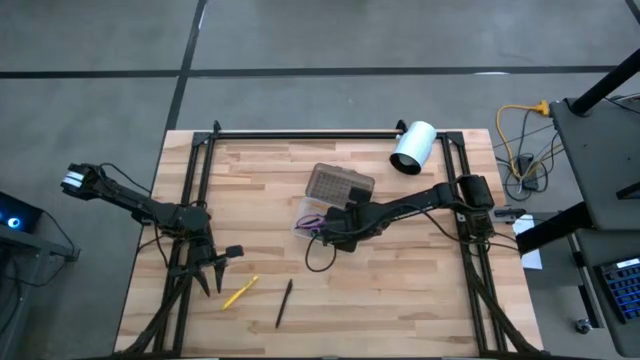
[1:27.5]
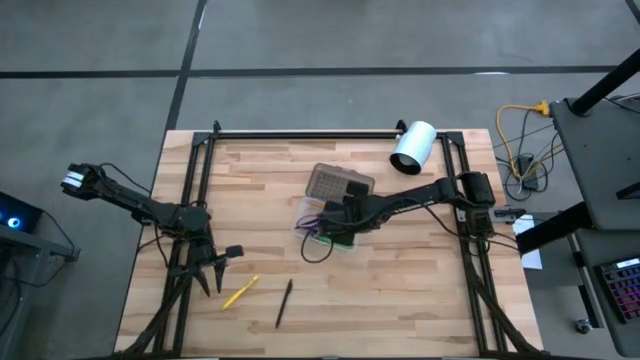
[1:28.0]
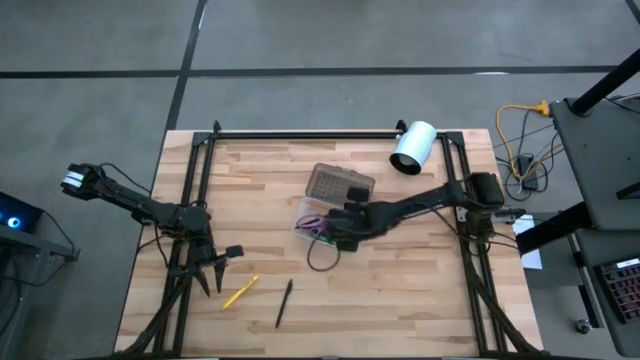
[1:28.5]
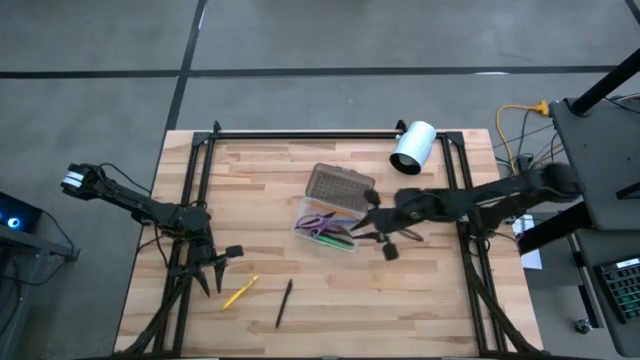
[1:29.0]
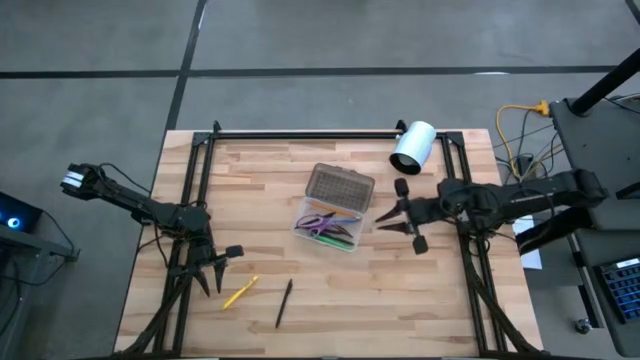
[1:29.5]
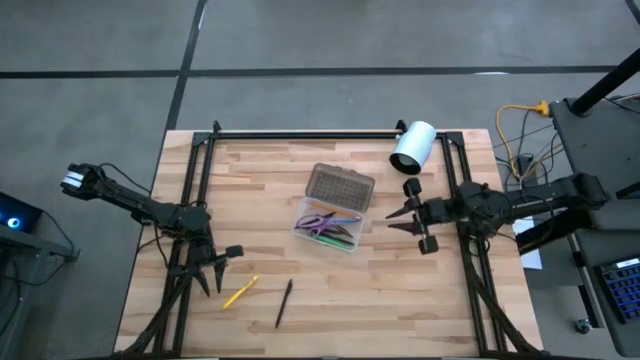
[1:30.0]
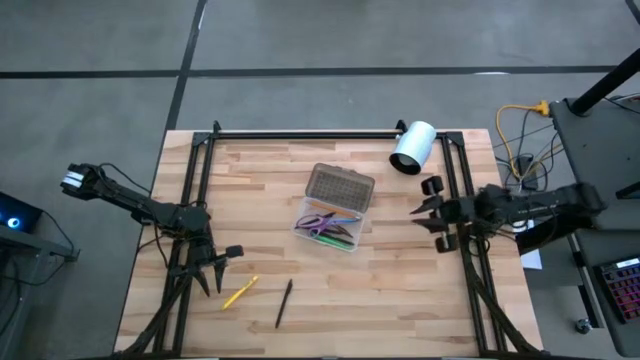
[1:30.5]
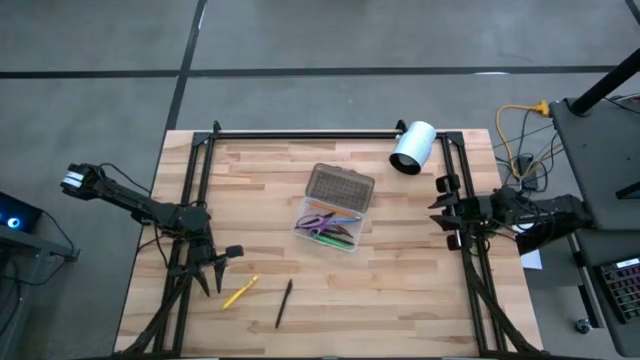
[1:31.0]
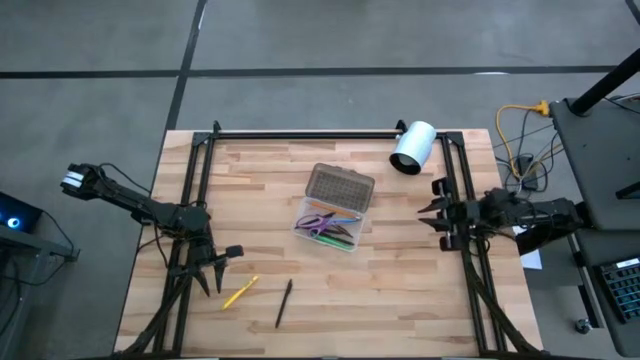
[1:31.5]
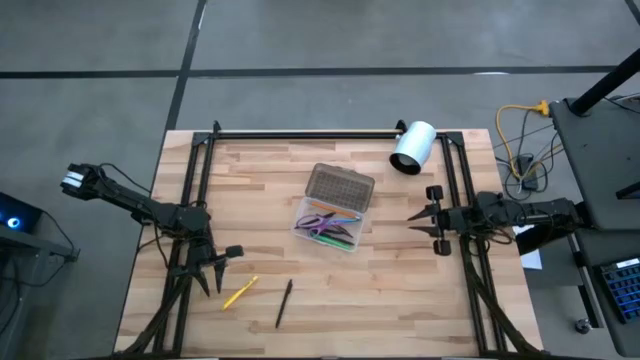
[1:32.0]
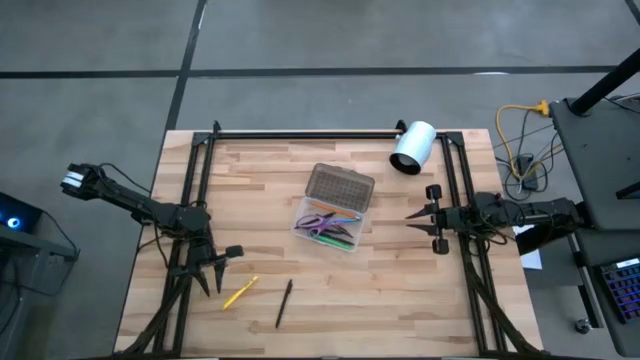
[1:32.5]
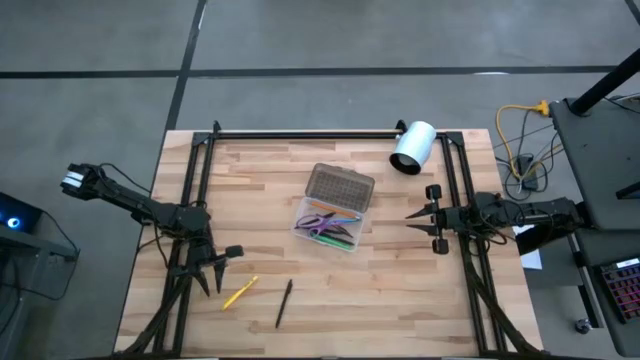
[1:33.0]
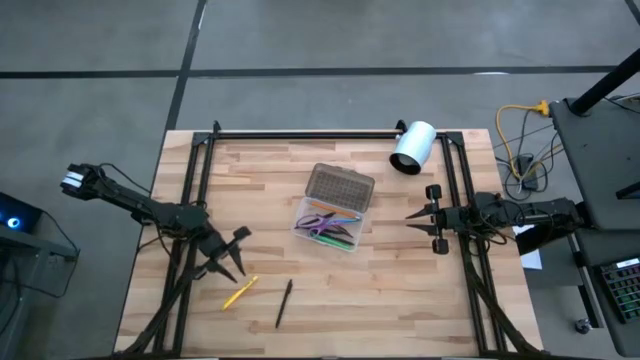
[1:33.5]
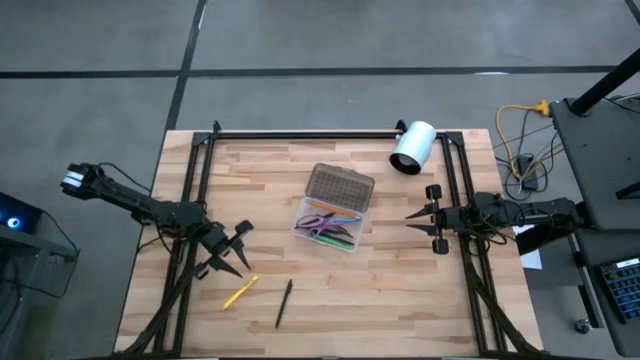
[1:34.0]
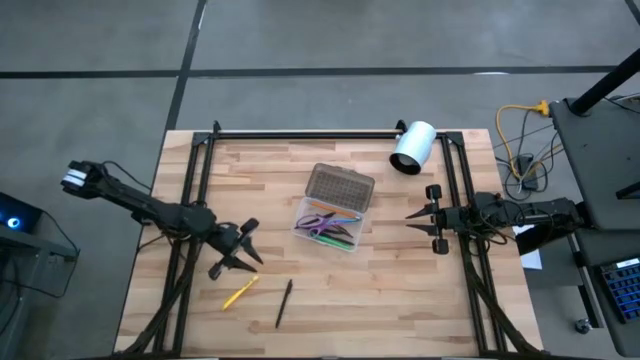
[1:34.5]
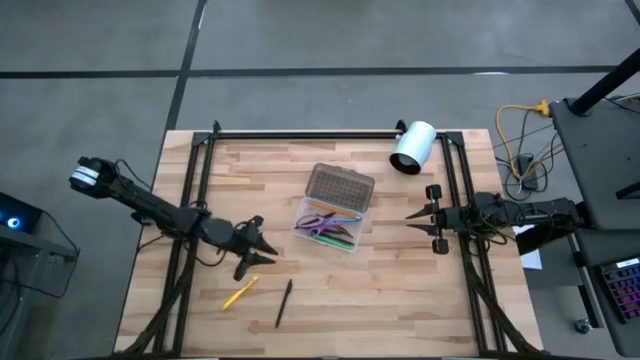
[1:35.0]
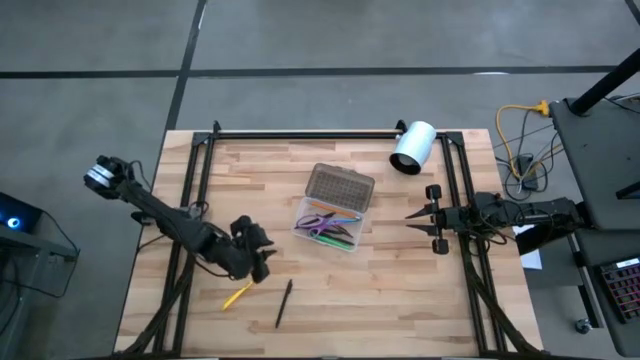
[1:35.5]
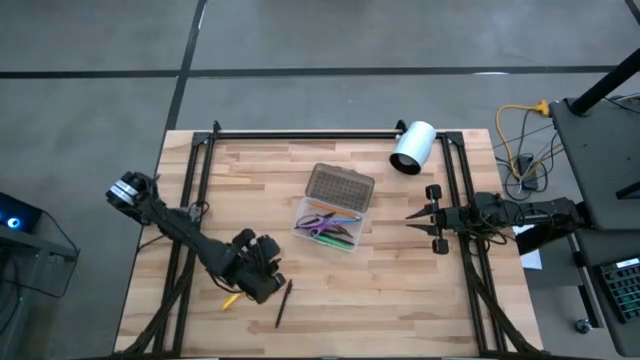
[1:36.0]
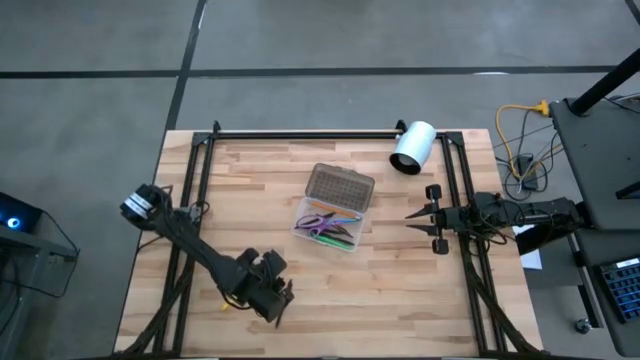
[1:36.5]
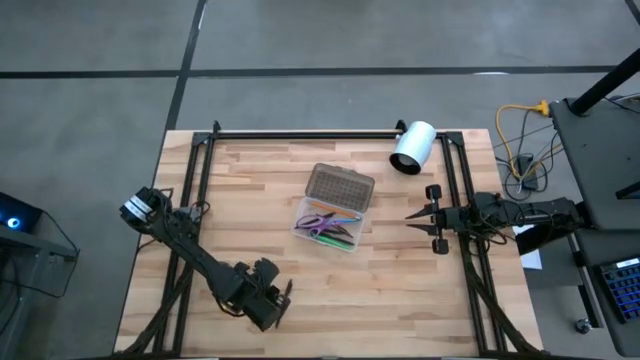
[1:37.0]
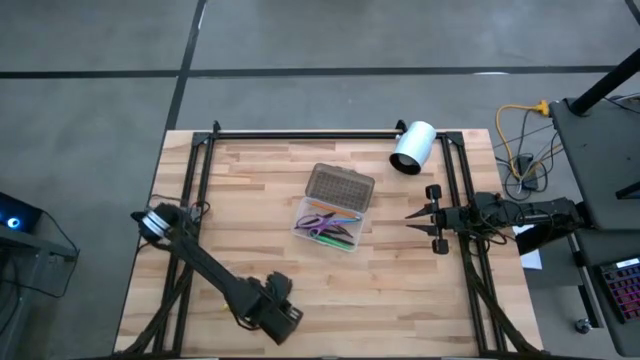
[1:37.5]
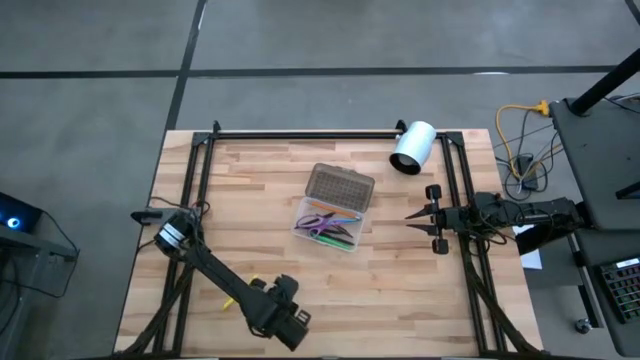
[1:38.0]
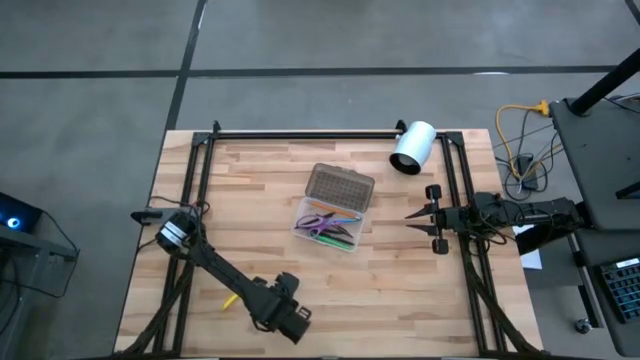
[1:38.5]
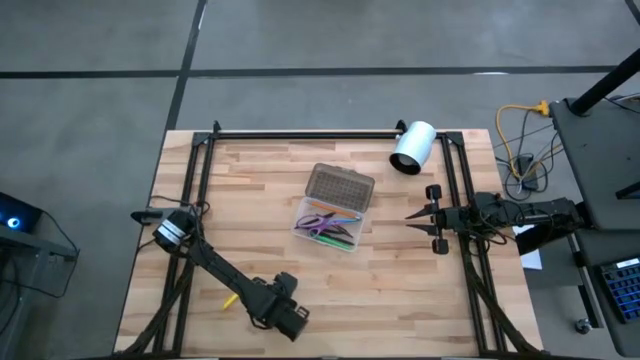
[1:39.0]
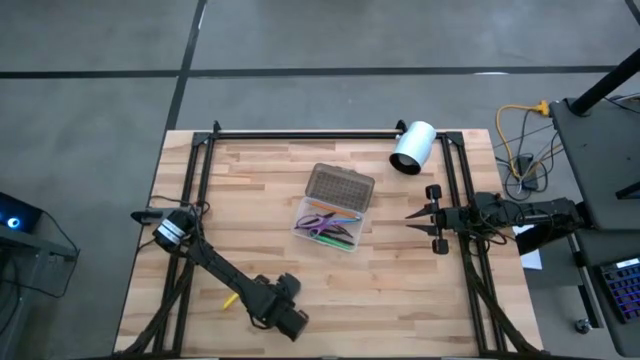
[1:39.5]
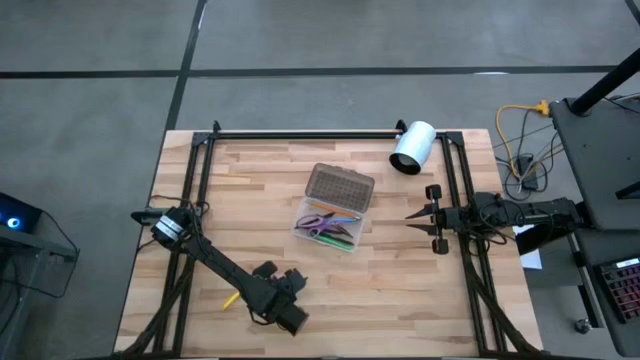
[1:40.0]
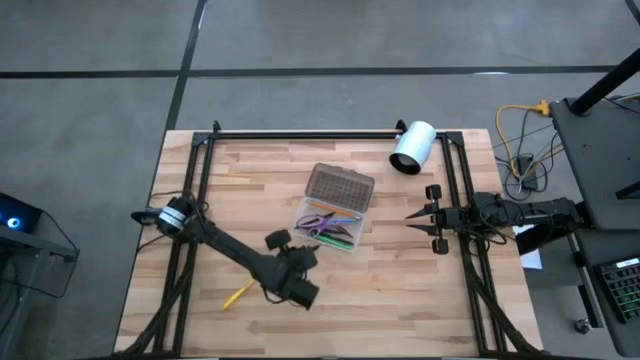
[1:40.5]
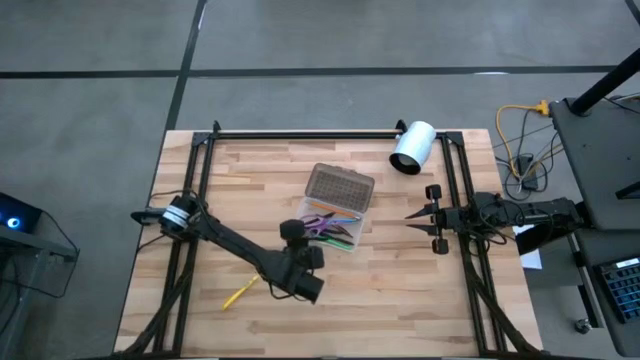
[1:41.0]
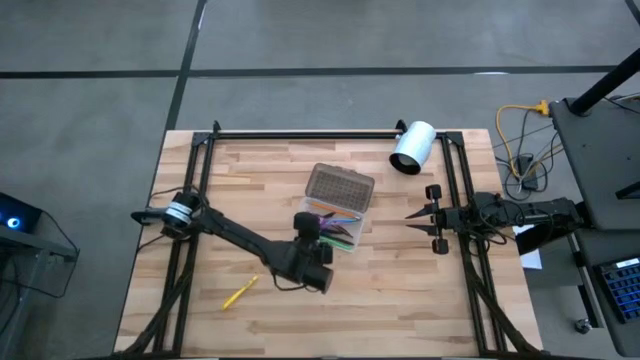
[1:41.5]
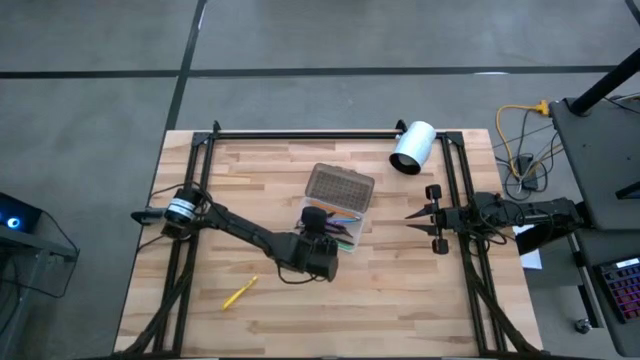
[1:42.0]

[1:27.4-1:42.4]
Task: Pick & place school supplies into a supply box
Put the black pen into the supply box

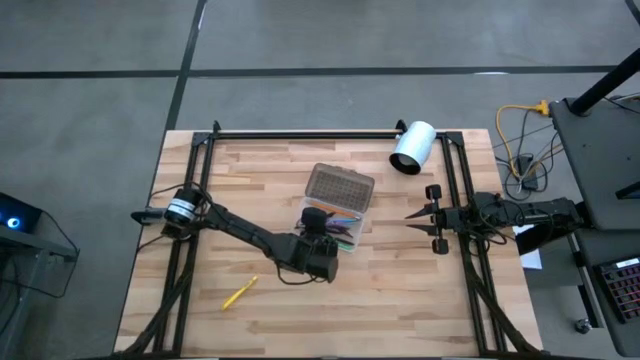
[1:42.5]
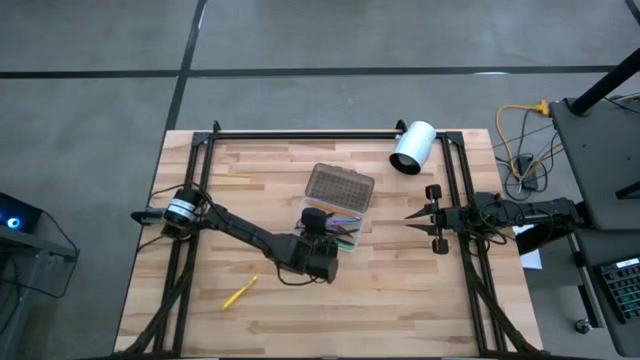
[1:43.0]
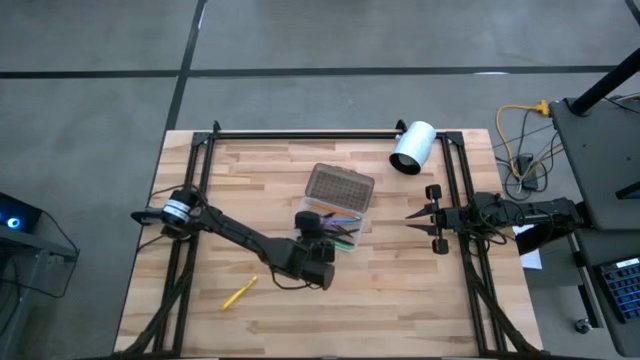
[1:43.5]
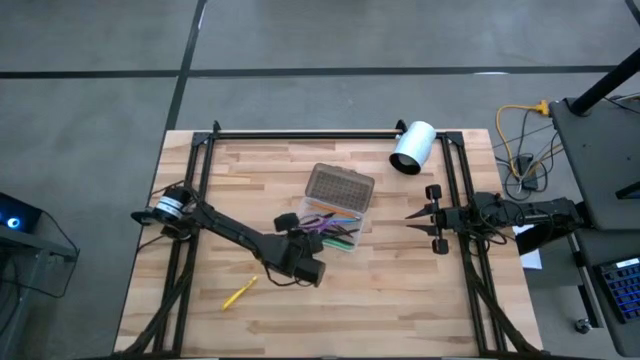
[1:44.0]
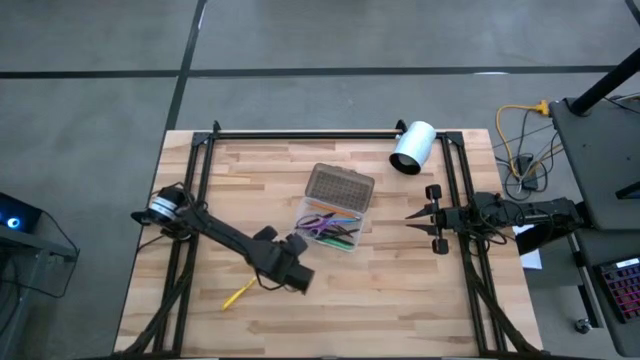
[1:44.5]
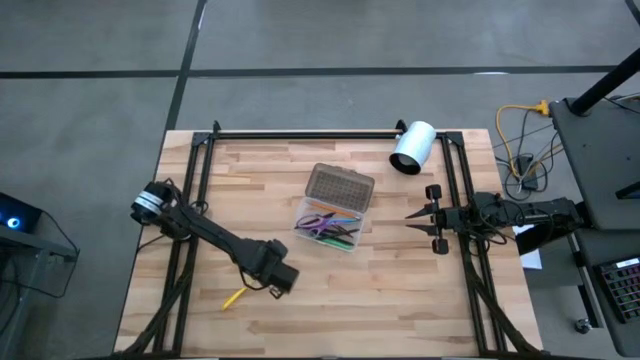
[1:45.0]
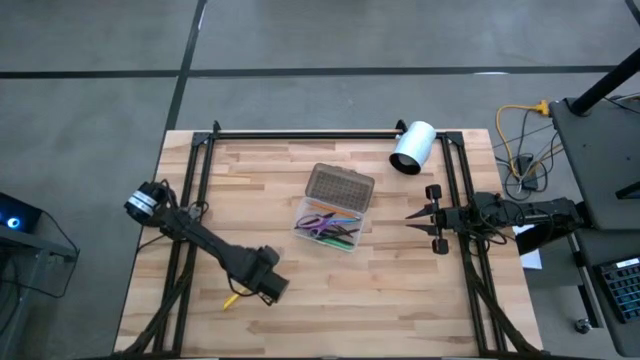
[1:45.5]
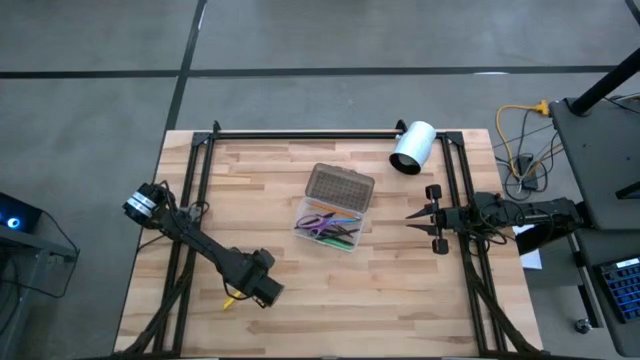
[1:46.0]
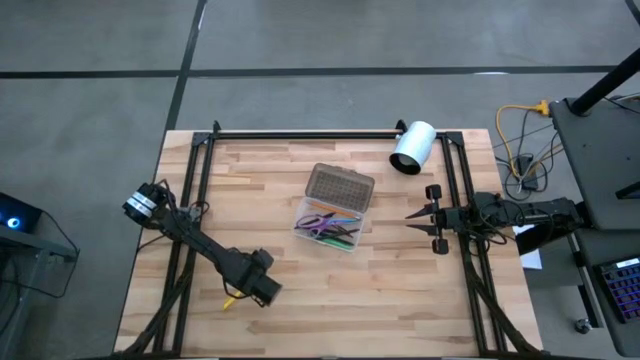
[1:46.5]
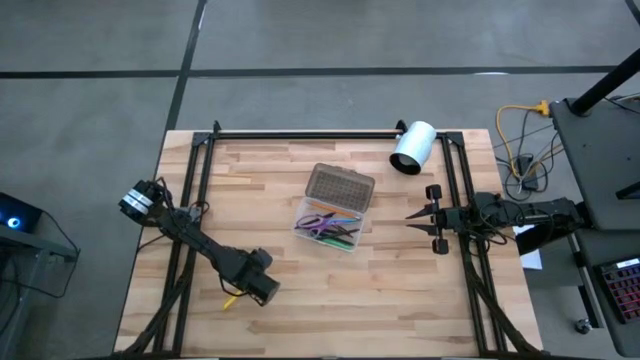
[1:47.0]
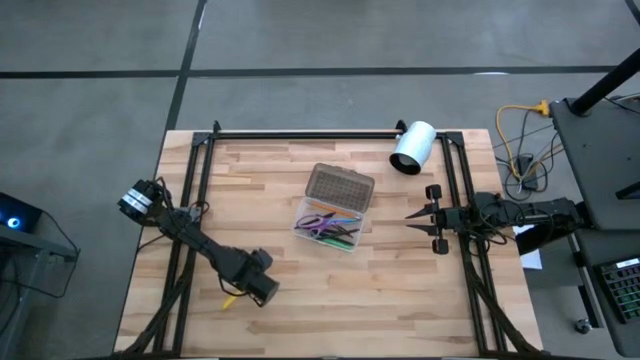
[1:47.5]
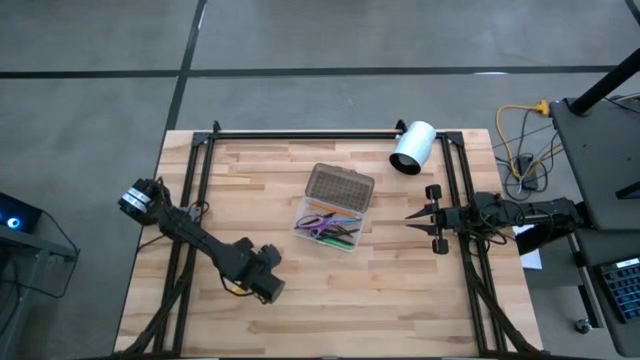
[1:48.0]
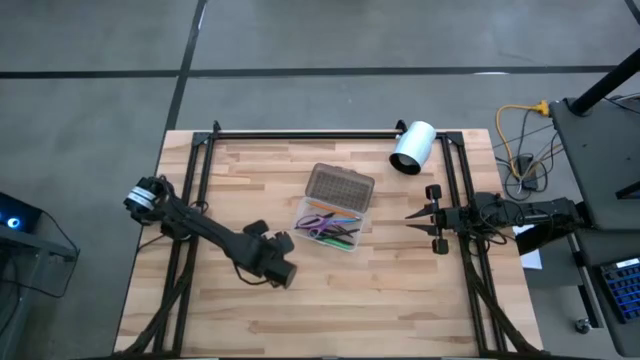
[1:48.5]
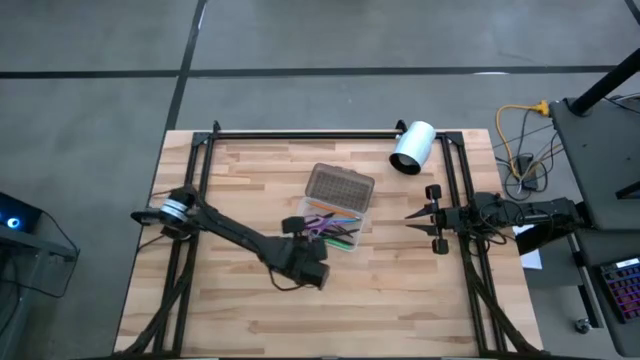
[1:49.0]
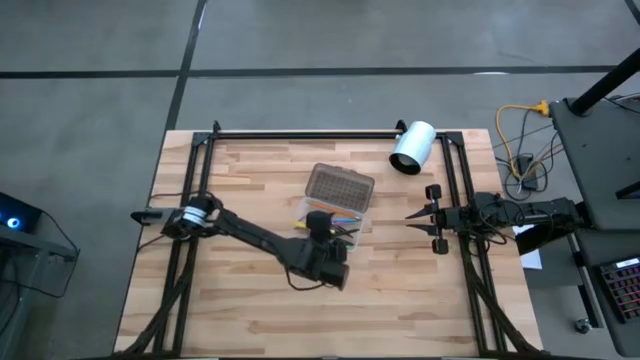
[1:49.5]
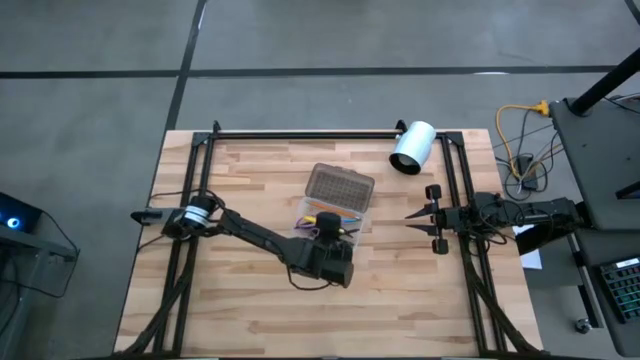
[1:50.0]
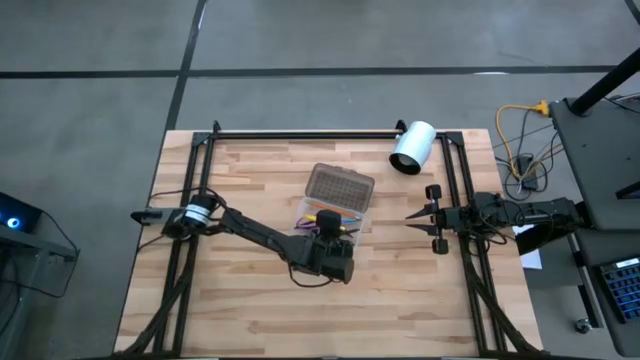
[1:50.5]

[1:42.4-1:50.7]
Put the yellow pen into the supply box
